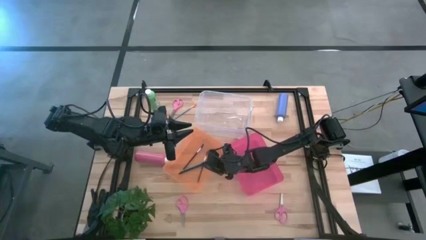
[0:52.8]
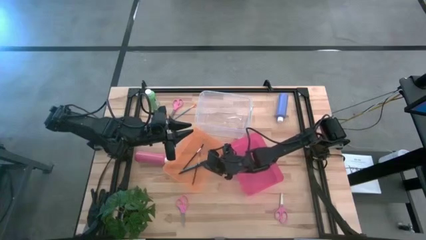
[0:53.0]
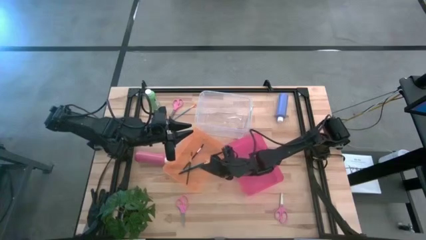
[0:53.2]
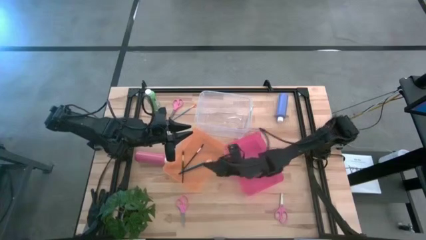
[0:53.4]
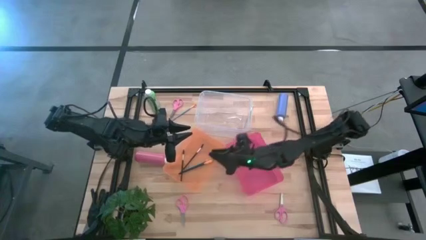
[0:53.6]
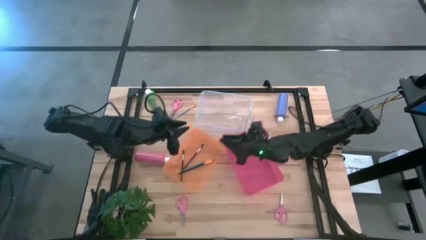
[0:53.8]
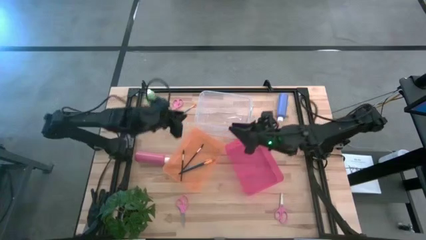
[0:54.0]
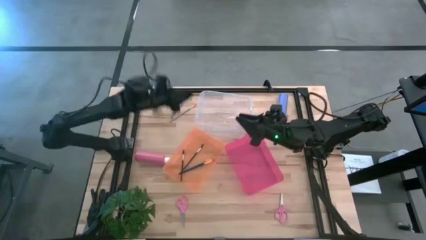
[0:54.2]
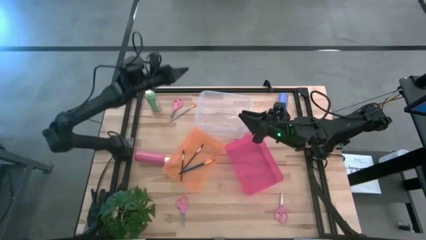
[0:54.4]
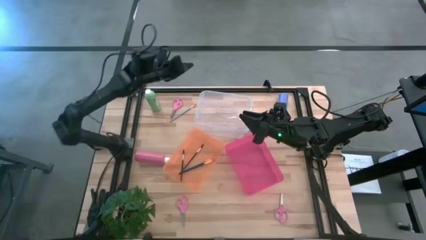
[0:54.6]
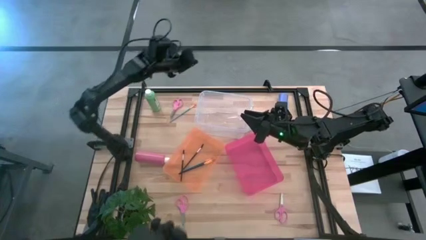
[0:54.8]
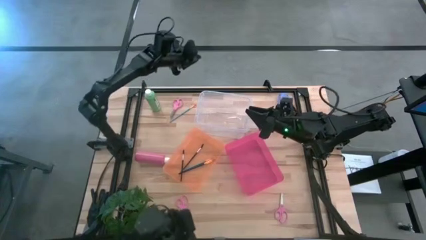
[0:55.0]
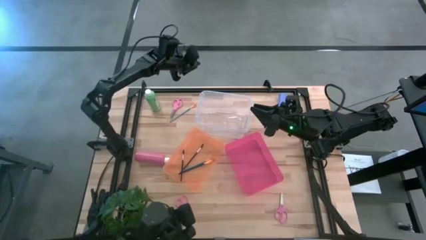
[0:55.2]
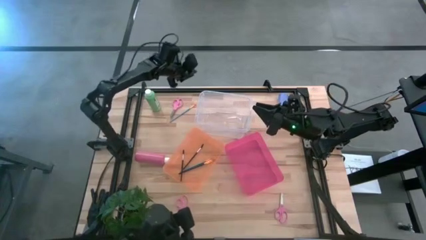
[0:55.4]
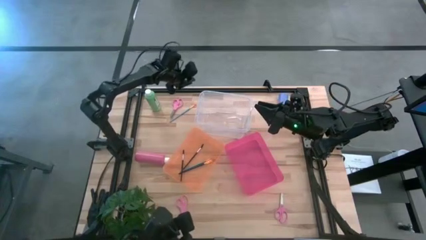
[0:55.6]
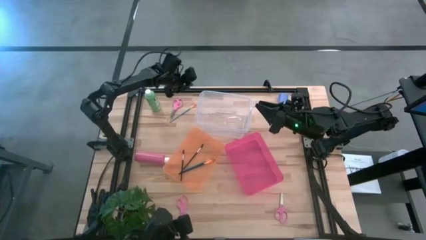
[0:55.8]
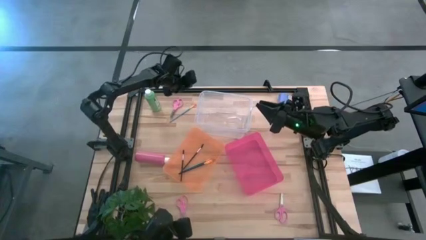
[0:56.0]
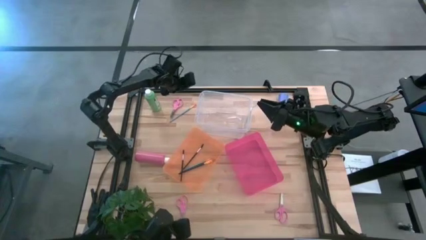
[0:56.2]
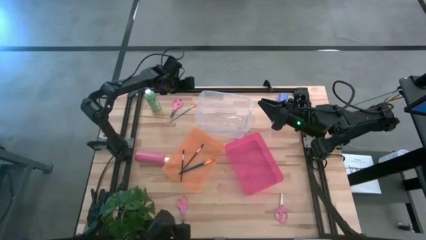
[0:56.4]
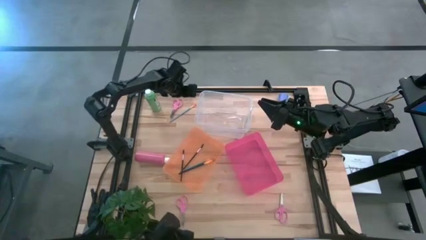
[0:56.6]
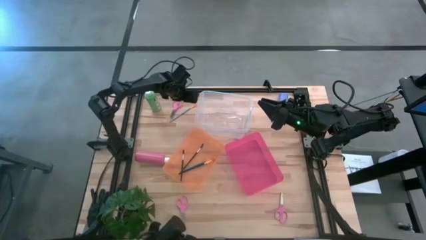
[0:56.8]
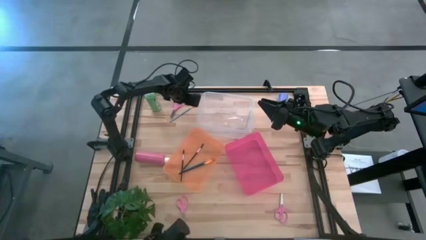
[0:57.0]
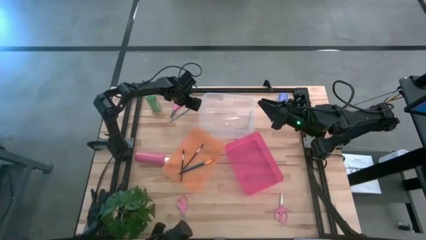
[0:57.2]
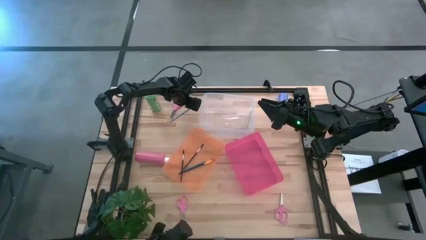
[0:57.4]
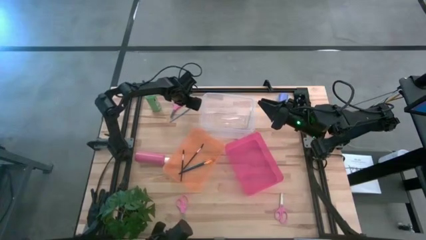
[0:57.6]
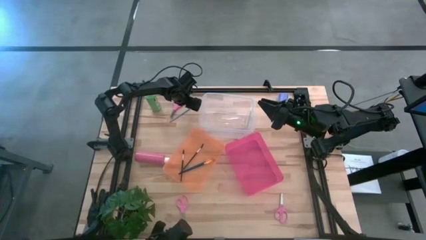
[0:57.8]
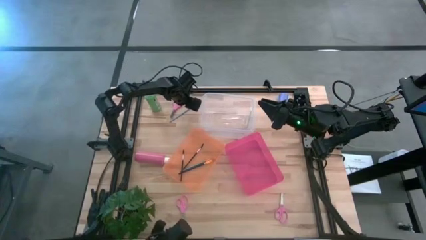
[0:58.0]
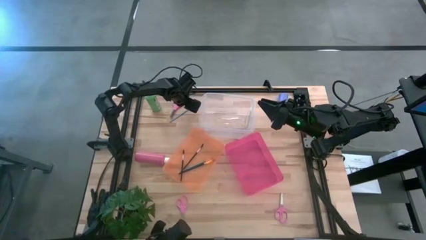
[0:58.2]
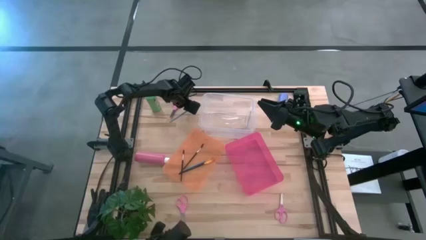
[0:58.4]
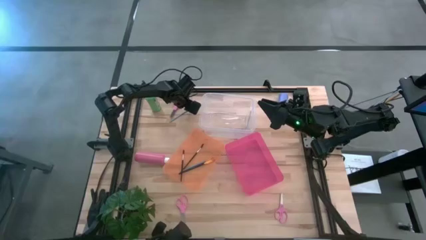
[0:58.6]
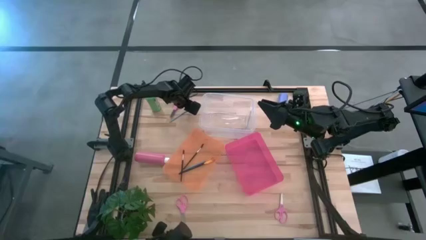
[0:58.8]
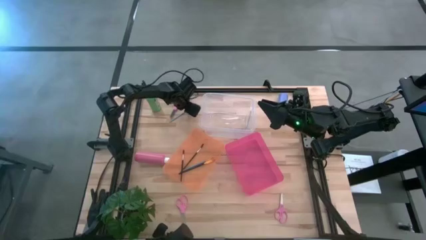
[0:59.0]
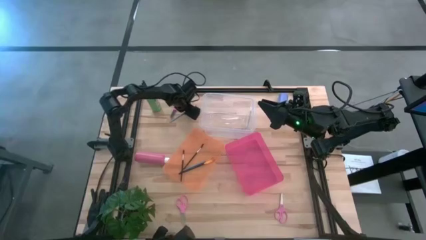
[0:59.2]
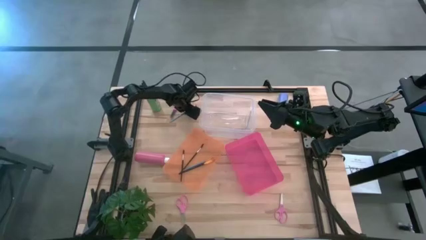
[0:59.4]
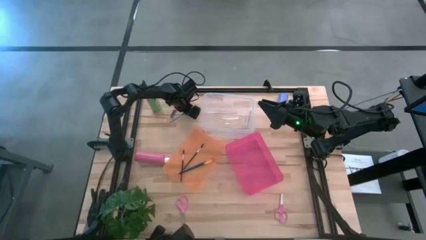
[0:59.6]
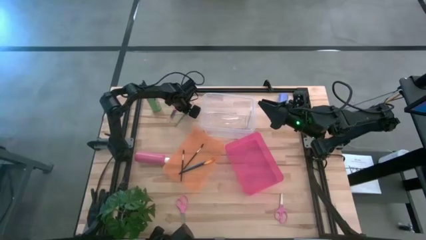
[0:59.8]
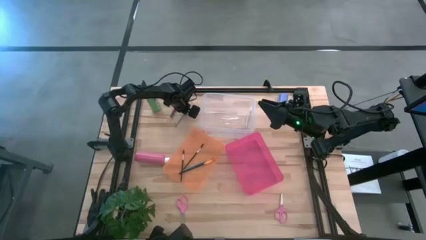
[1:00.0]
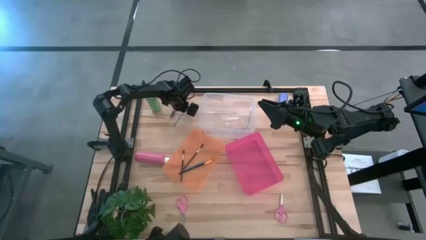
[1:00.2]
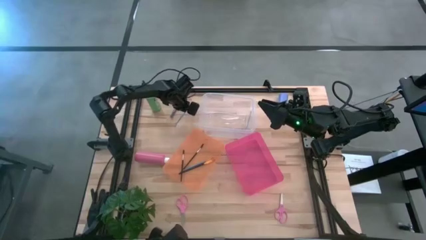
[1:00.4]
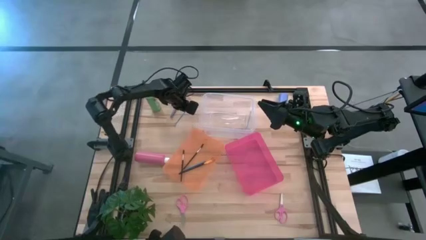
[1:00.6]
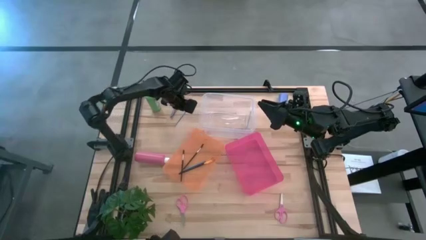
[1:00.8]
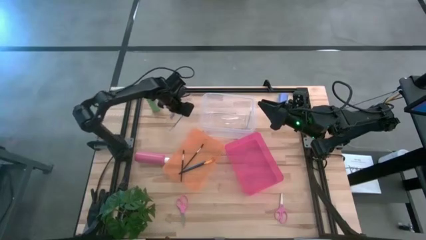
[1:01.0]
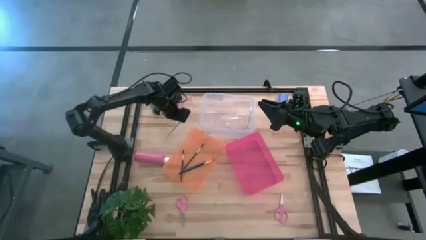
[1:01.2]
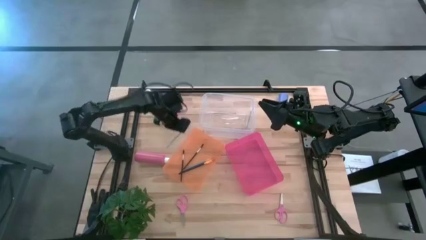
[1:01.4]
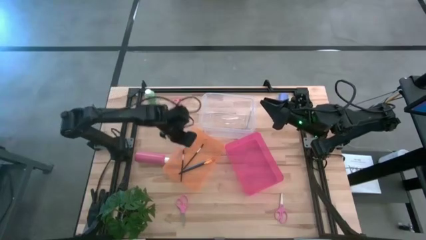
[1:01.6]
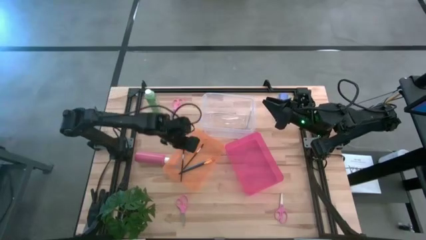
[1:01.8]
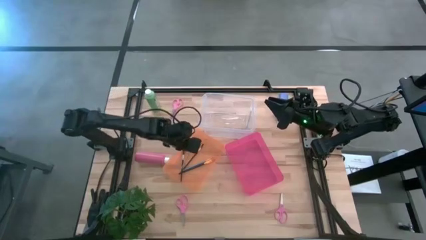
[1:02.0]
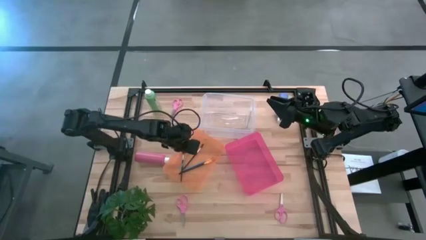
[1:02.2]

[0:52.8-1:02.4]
Task: Pick & Place Paint Supplies
Put the blue paint brush into the orange bin

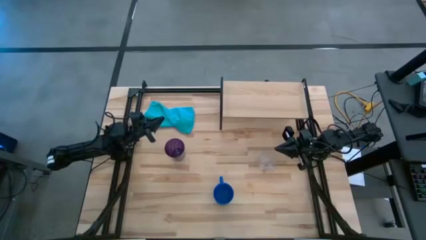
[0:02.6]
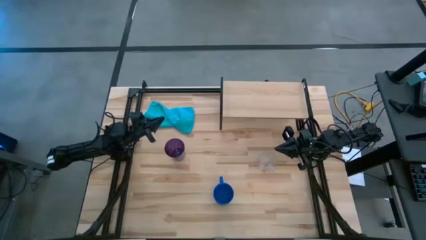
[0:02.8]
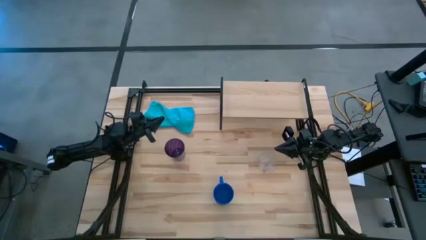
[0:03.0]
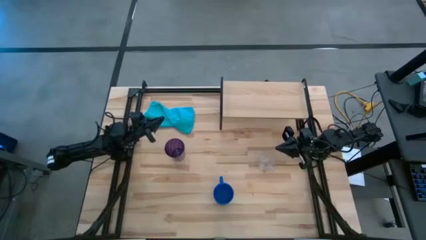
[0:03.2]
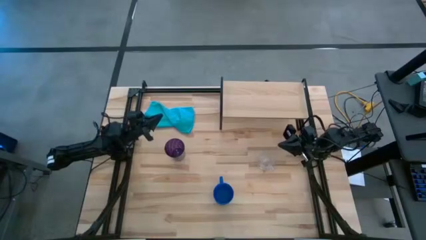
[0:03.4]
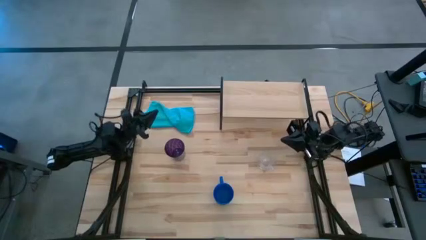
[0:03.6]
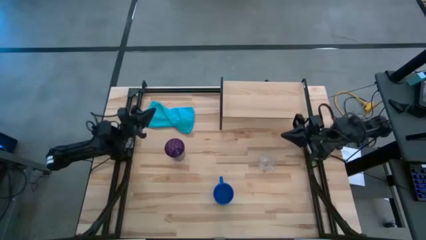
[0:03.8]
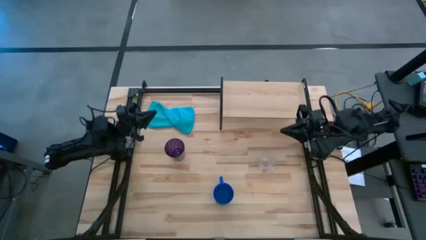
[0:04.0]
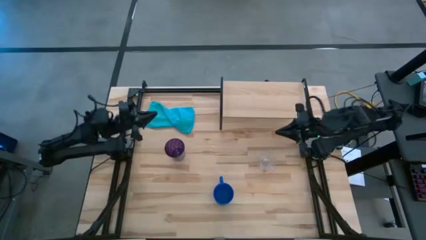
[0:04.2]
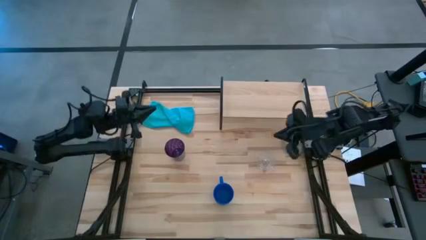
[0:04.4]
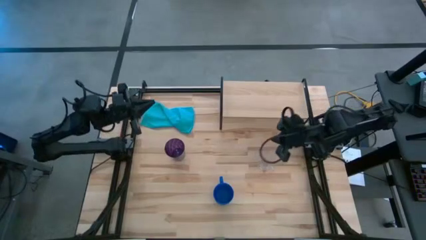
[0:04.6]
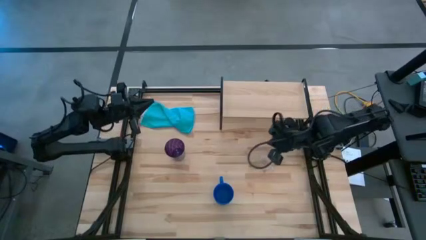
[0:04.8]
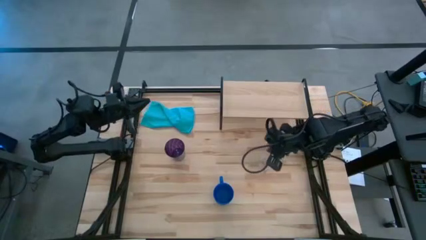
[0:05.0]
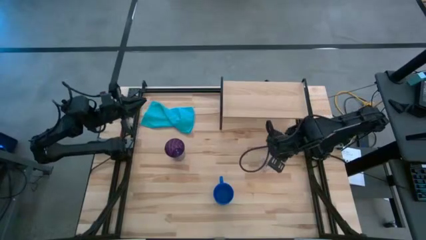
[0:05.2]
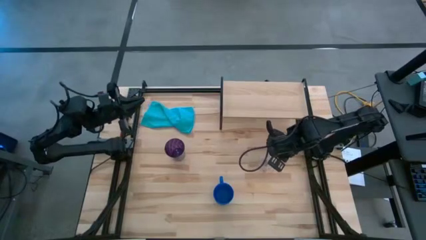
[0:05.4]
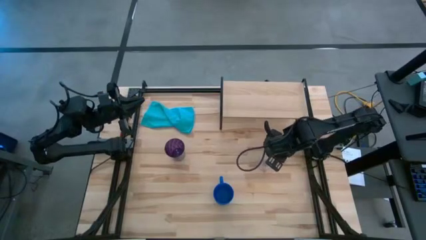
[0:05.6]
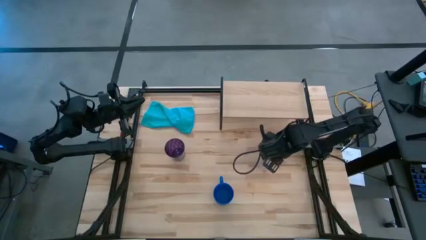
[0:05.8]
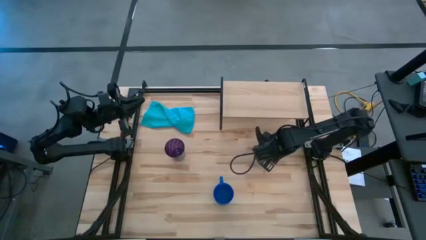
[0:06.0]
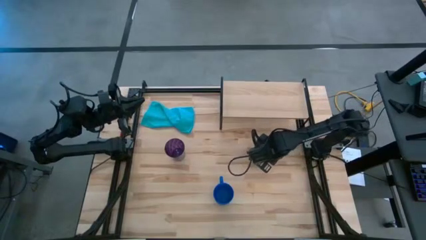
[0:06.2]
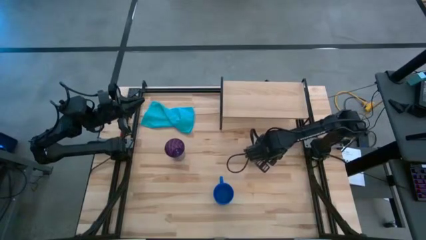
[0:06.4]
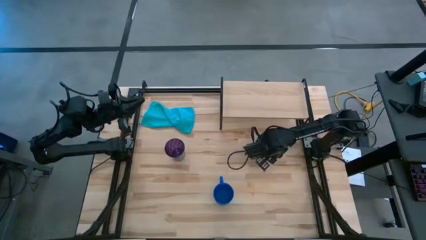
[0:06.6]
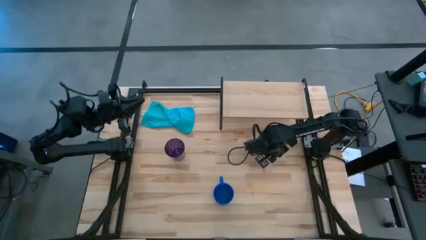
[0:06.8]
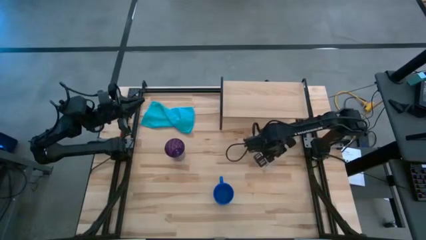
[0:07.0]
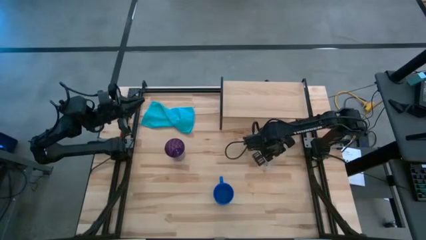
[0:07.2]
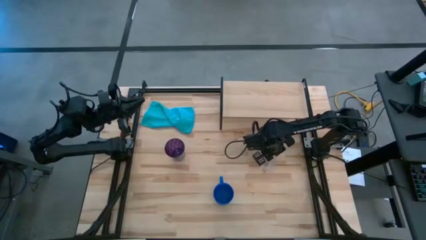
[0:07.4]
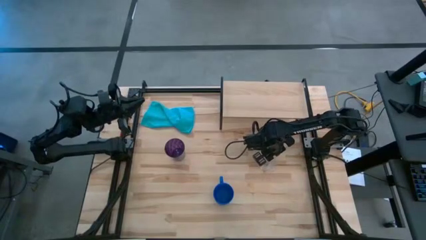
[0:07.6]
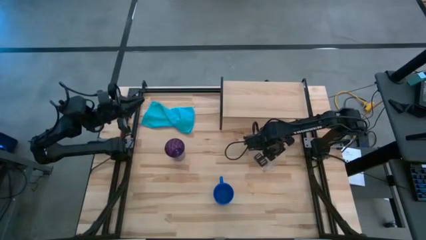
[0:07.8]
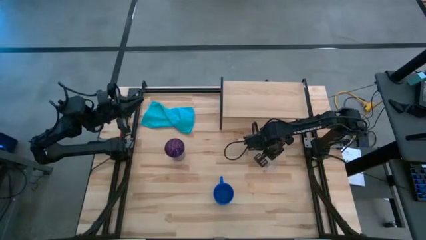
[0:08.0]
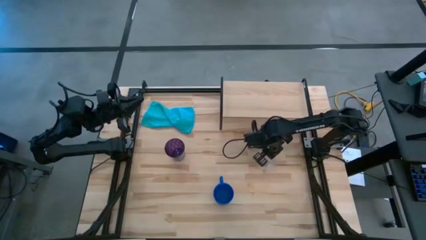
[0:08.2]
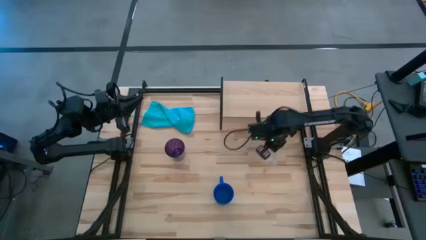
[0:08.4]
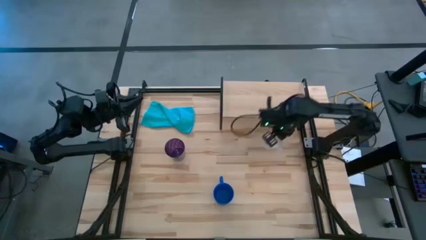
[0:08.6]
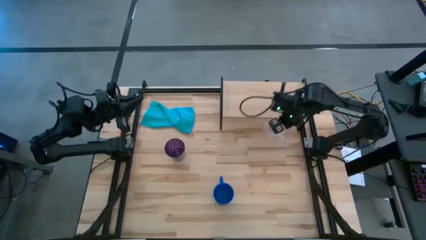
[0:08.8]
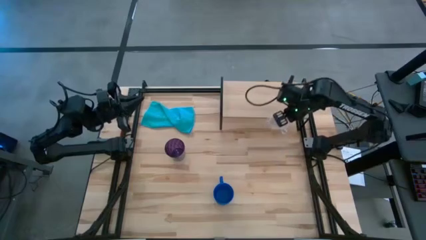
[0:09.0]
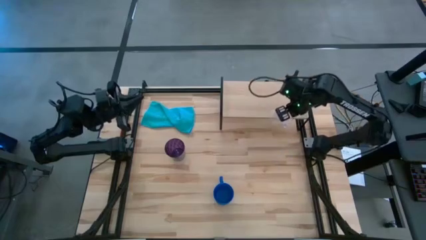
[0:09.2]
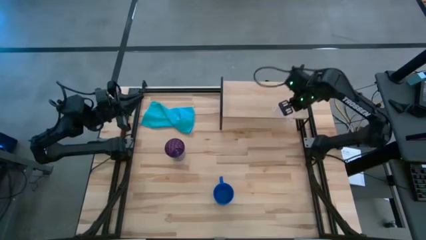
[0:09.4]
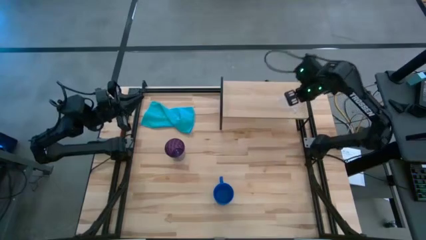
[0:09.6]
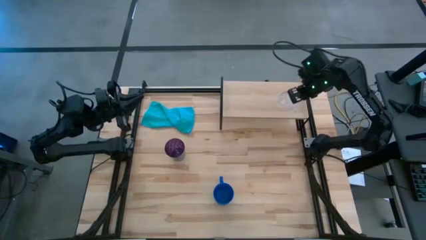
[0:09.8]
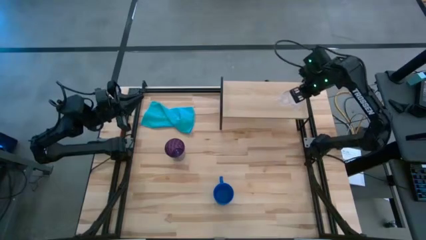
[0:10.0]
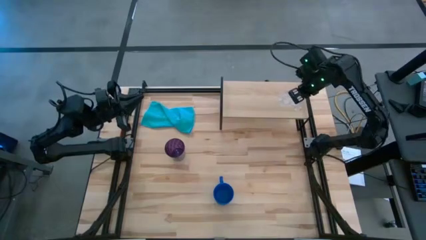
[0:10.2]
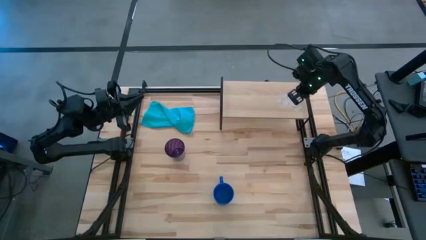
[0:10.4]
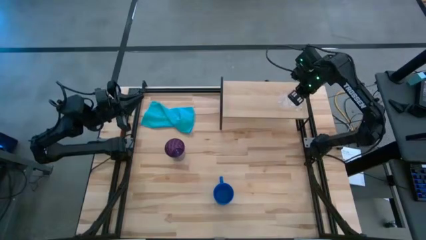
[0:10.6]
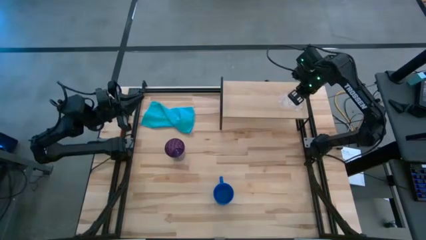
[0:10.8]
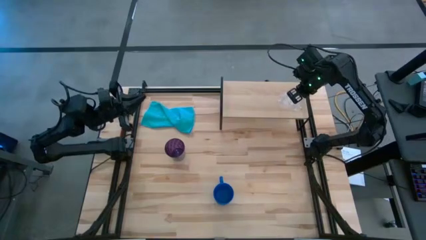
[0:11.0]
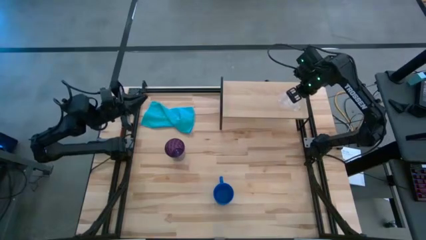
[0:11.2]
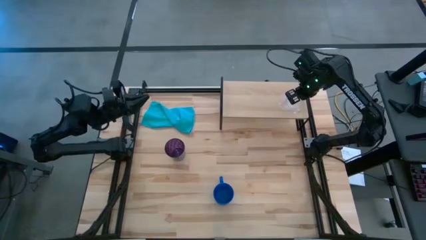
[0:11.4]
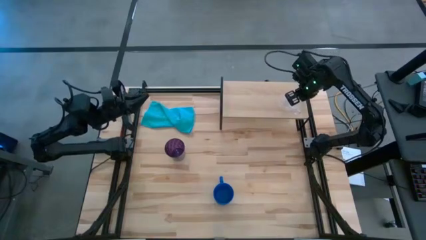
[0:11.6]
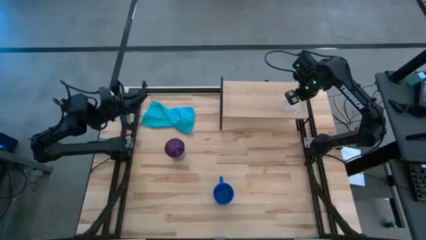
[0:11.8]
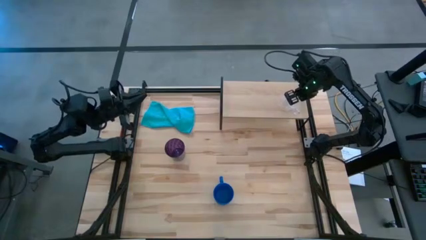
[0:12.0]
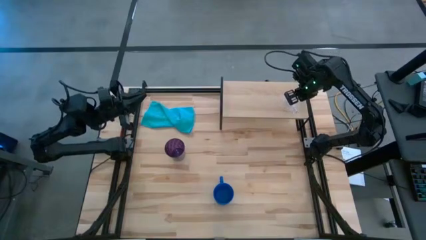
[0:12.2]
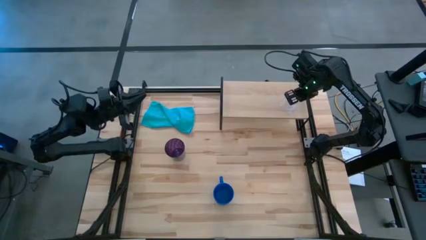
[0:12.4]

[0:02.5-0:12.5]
Task: Stack small to large cups/mugs on shelf
Put the transparent cup on the shelf
